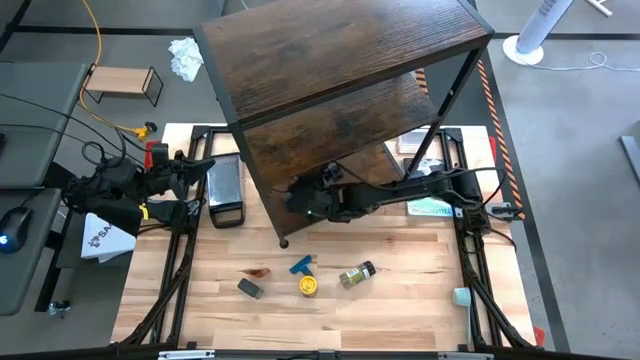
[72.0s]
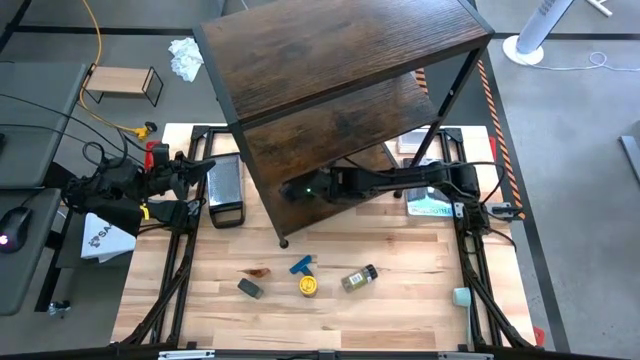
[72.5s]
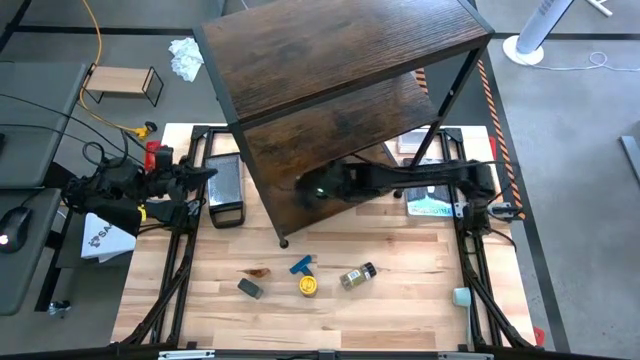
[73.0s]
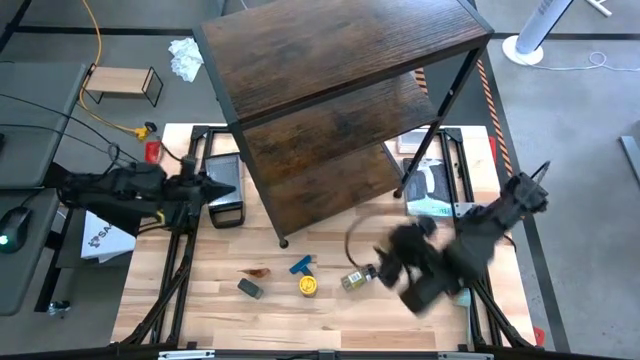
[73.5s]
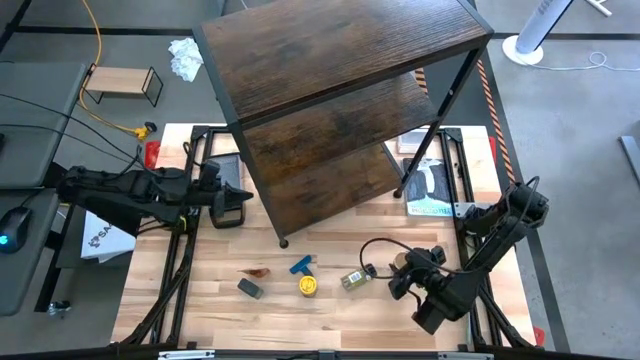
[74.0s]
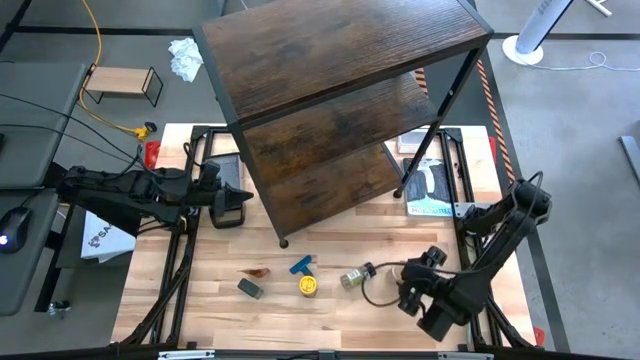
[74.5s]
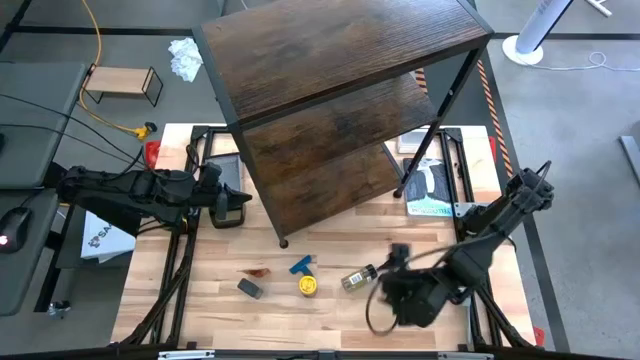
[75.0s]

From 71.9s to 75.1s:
Task: Shelf spices
Remove the brown seasoning bottle from the shelf

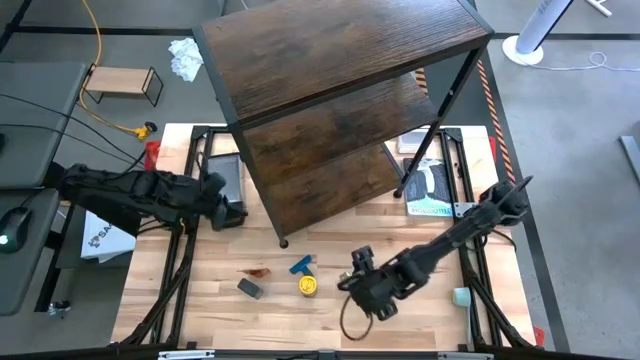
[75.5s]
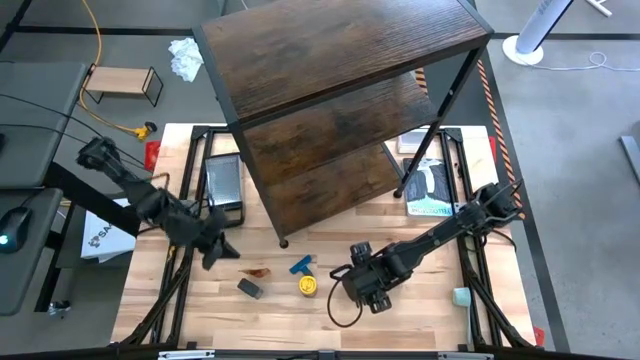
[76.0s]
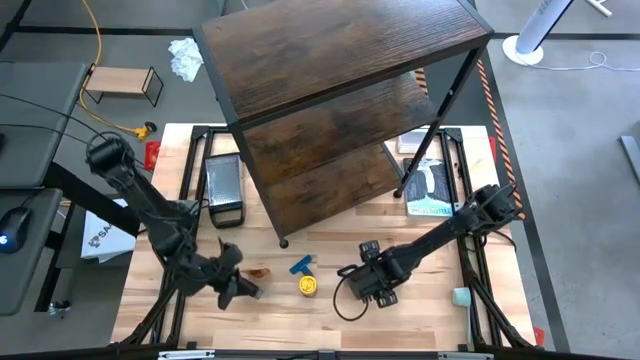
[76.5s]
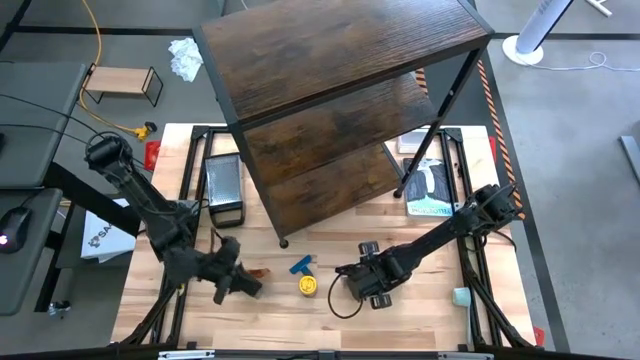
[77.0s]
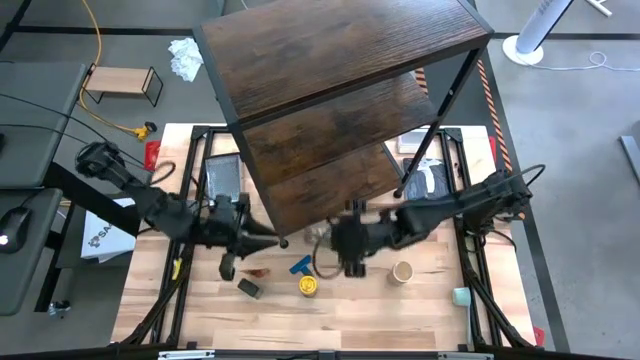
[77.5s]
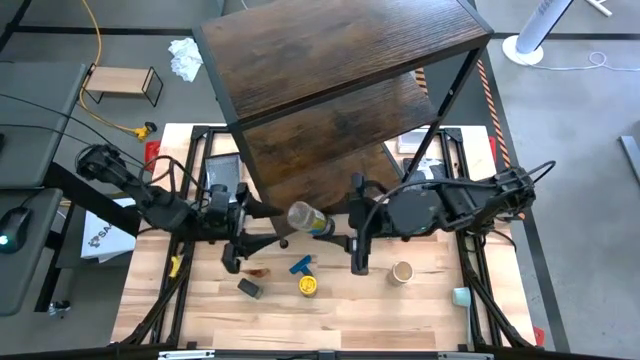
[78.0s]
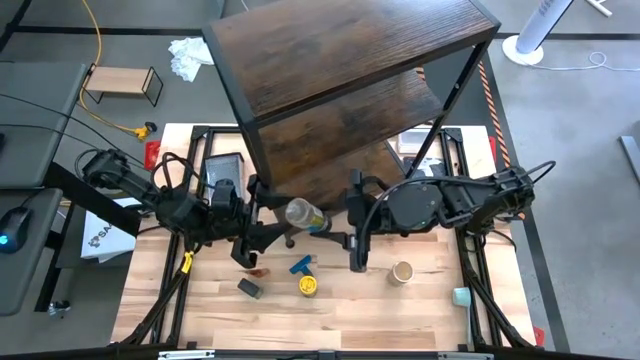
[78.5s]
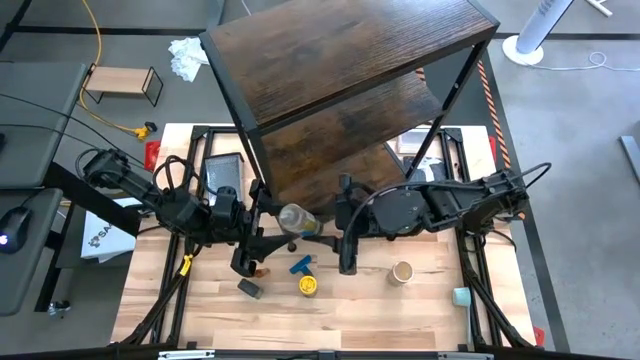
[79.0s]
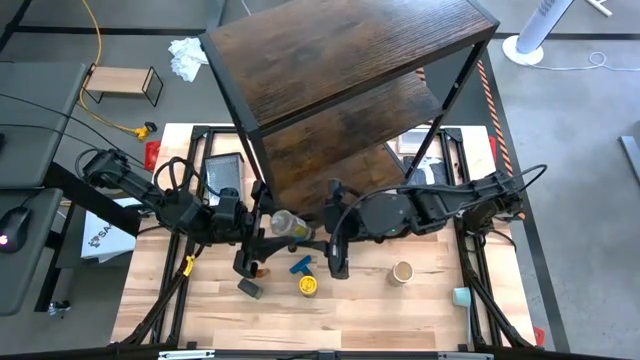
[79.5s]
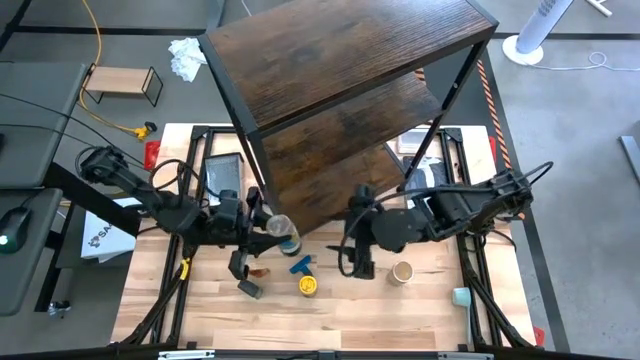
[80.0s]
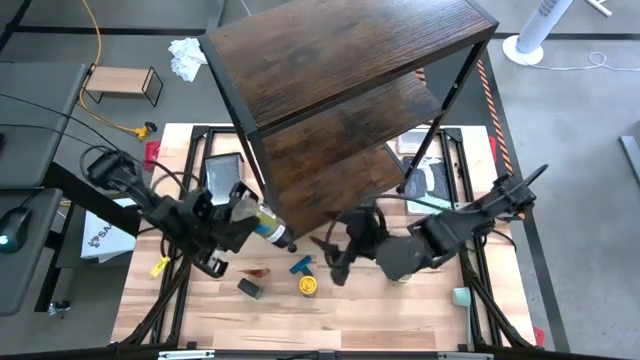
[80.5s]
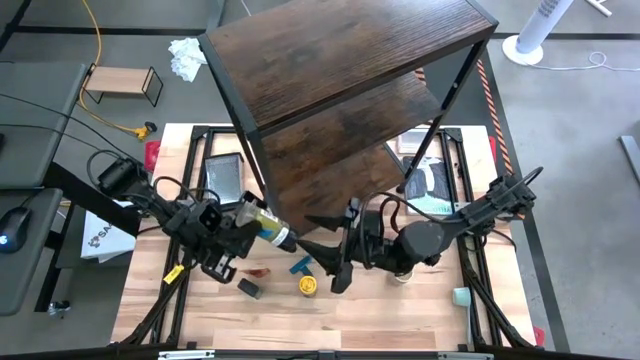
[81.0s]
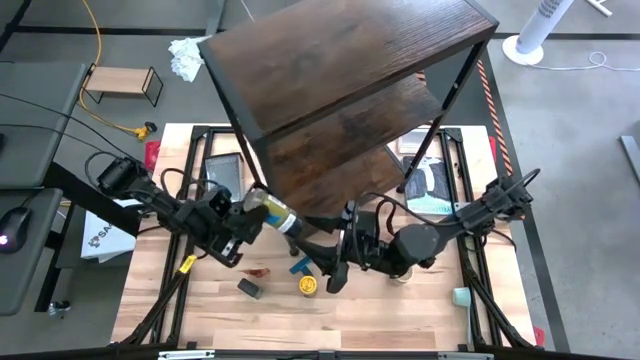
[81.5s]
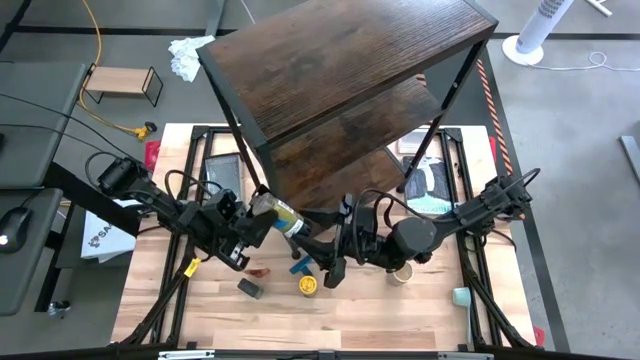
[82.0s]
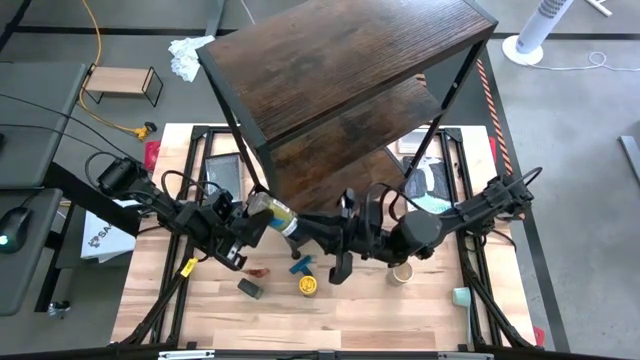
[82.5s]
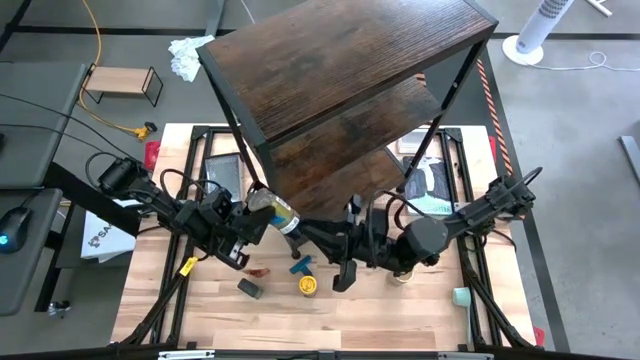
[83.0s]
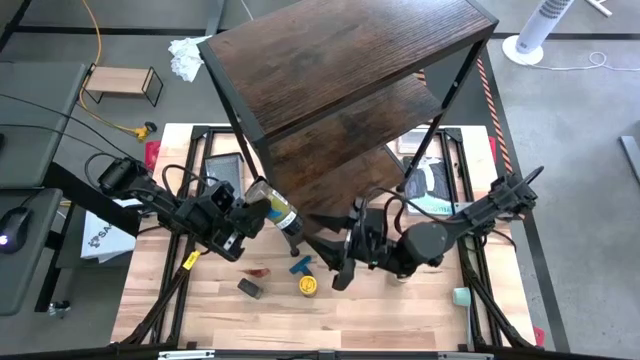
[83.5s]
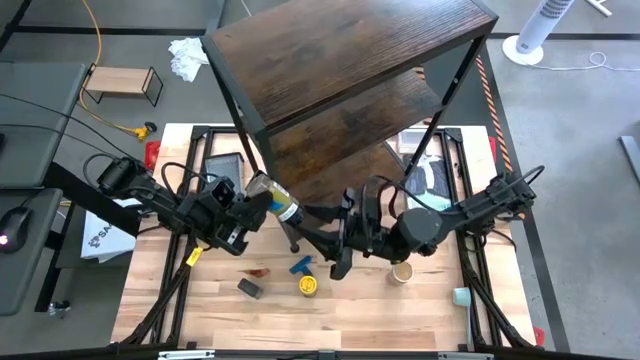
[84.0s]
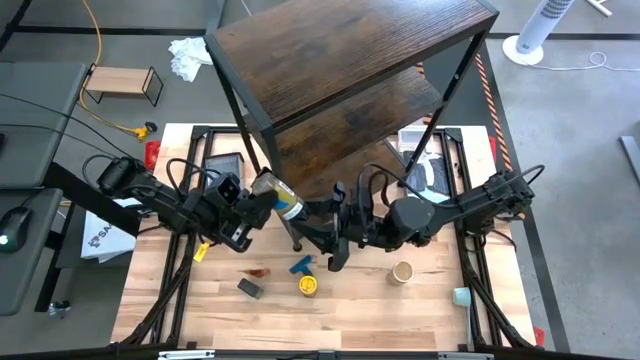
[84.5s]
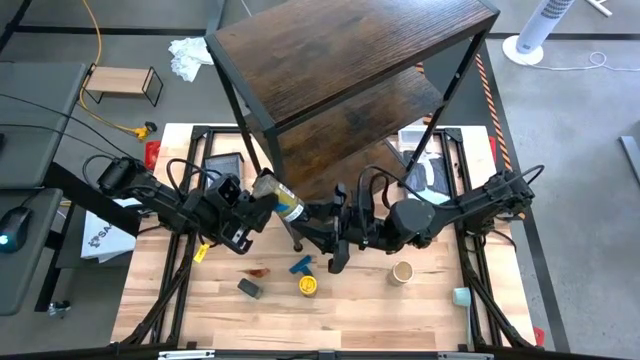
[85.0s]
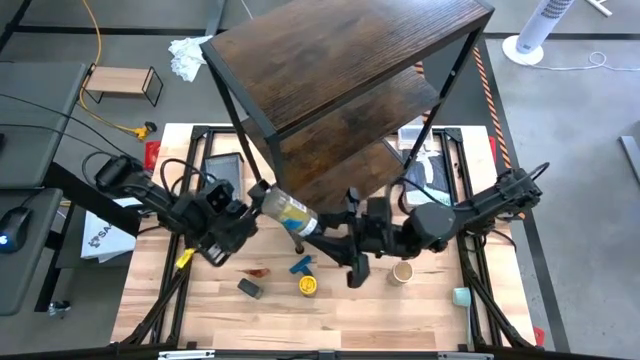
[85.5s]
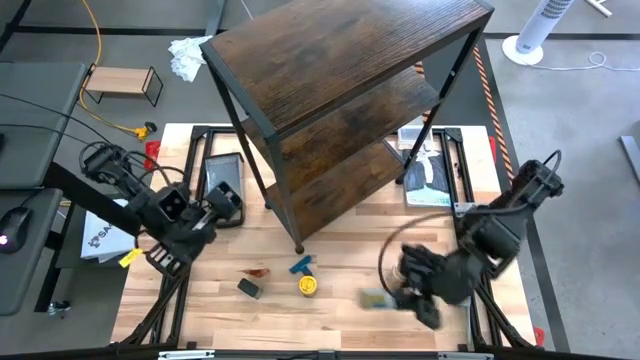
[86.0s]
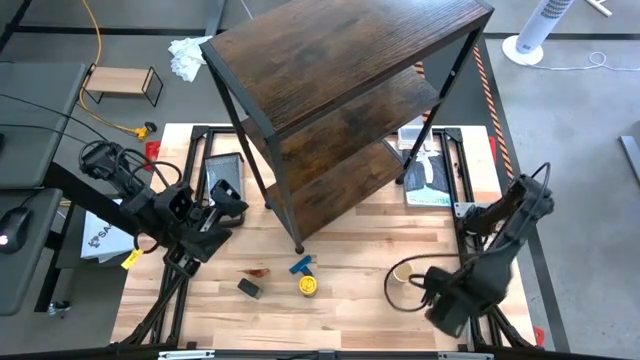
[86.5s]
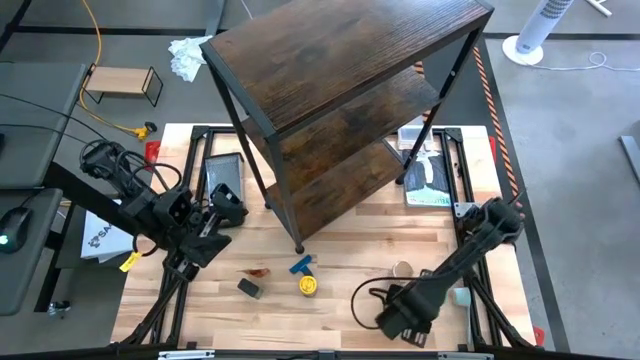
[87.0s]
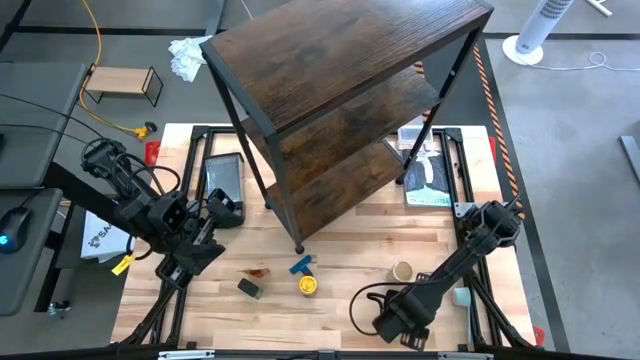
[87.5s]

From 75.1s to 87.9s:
Move the black seasoning bottle to the bottom side of the table

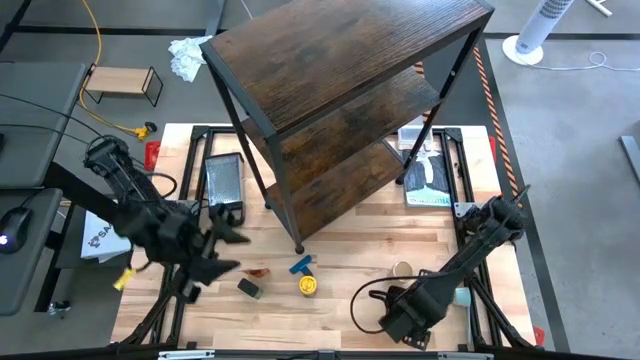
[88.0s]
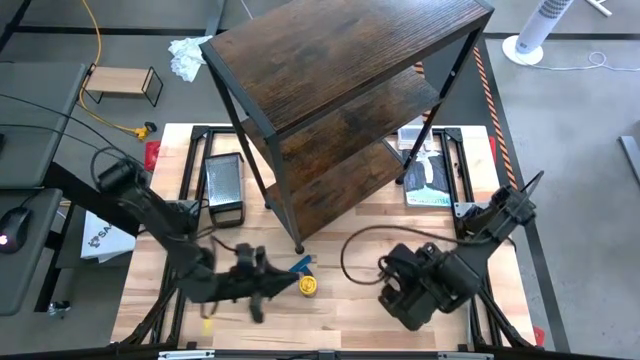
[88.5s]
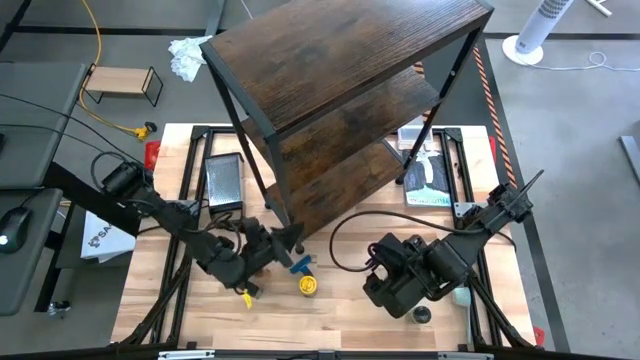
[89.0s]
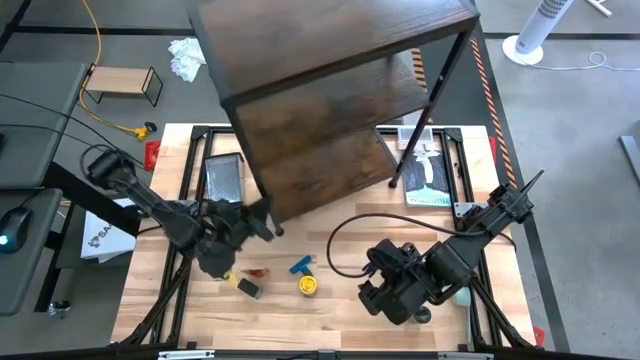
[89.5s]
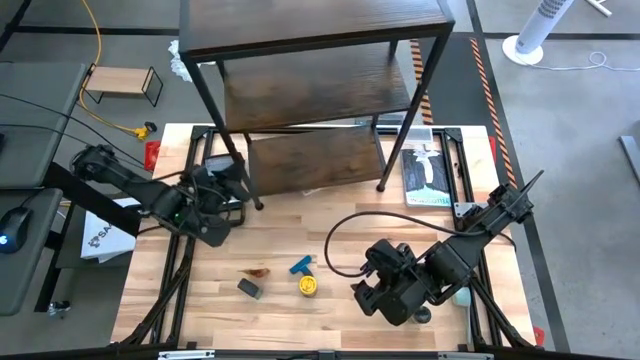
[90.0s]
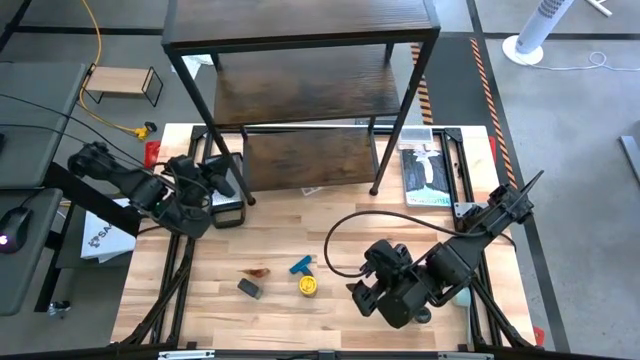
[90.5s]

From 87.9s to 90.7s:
Adjust the shelf

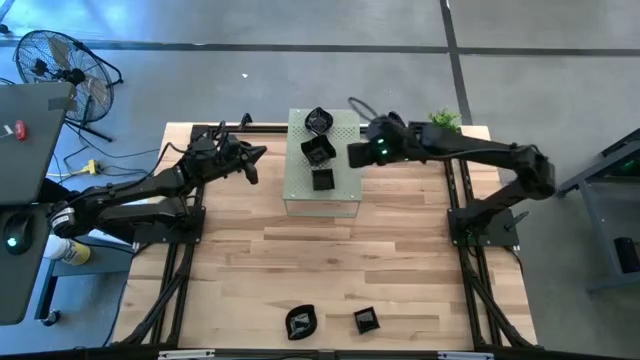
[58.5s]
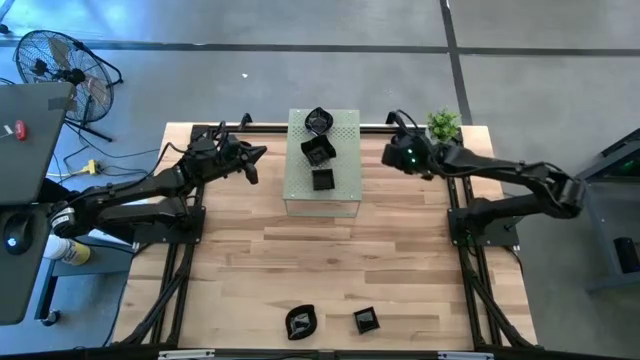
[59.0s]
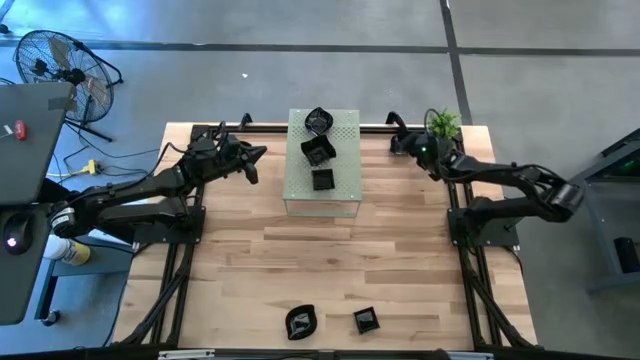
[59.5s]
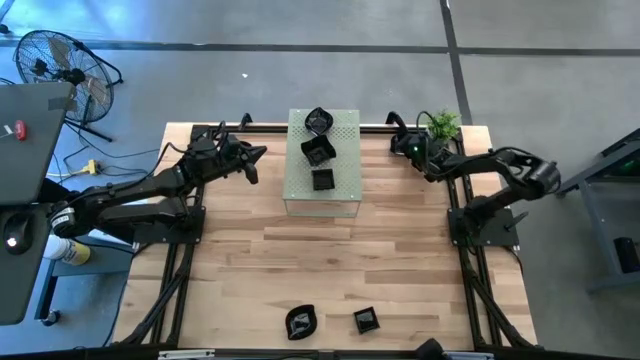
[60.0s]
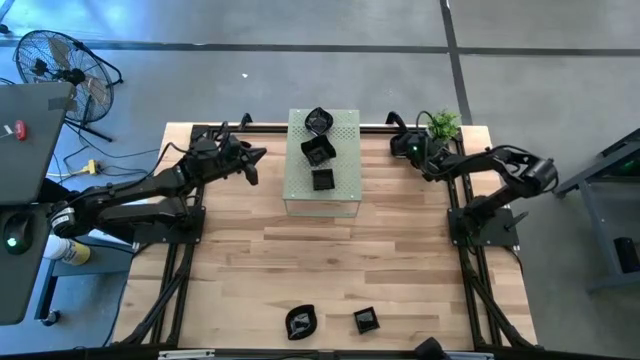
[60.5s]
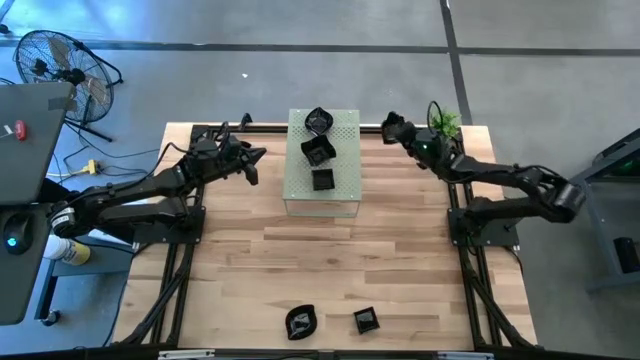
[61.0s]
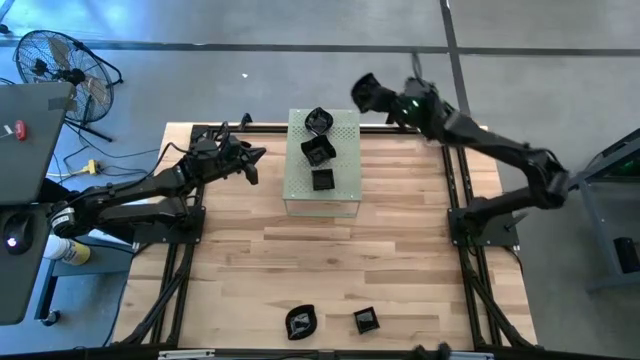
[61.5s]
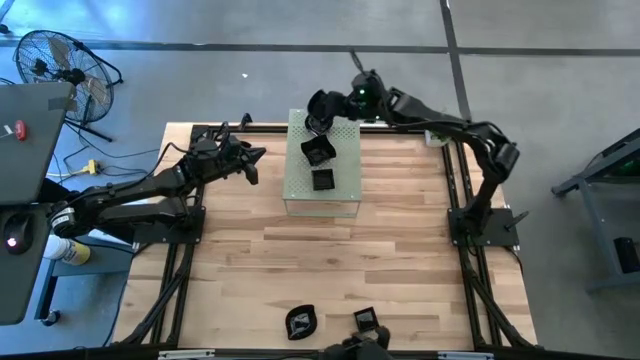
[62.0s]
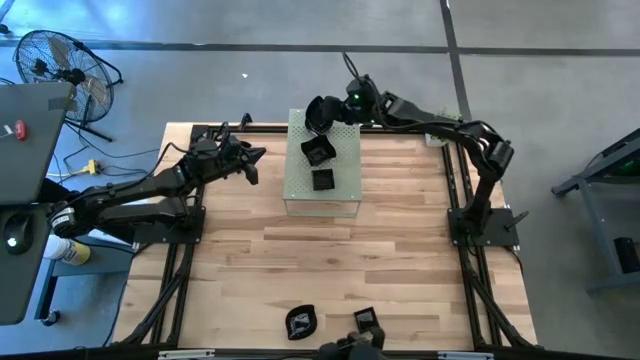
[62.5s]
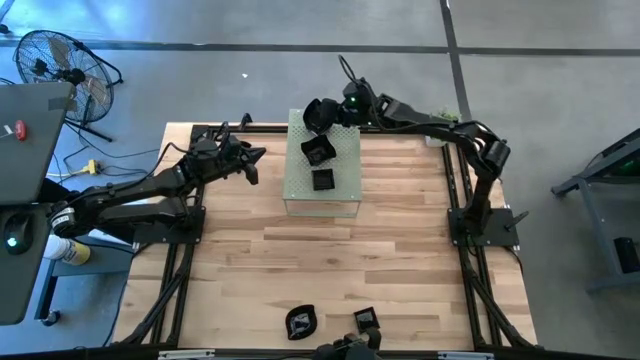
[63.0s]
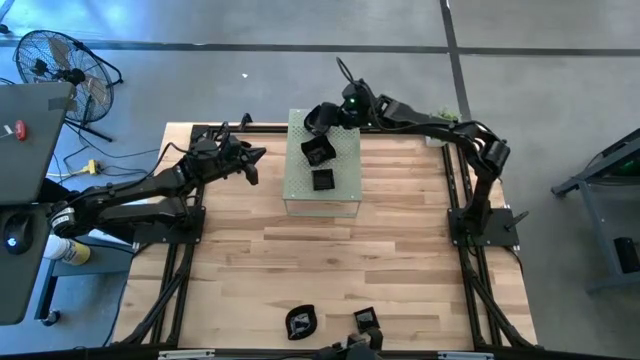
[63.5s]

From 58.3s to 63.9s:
Task: Pick & Place Mini shaped plates
Stack the black leaf-shaped plate on top of the black leaf-shaped plate on the shelf
